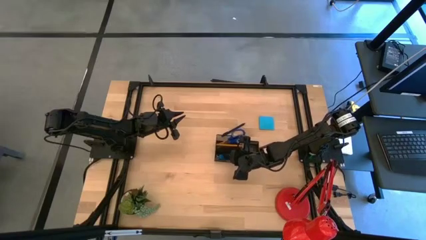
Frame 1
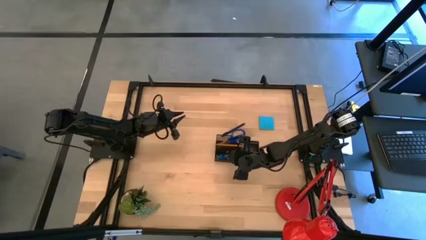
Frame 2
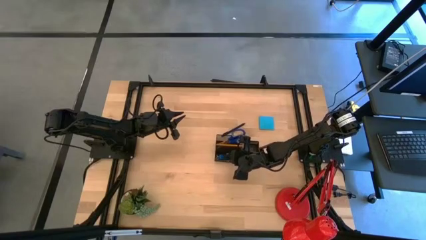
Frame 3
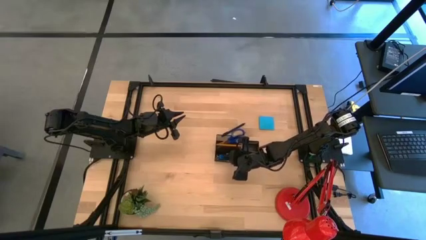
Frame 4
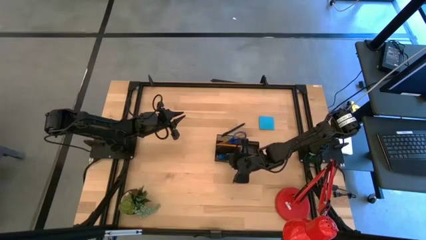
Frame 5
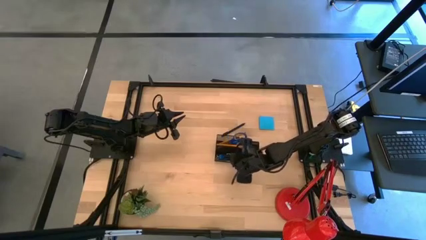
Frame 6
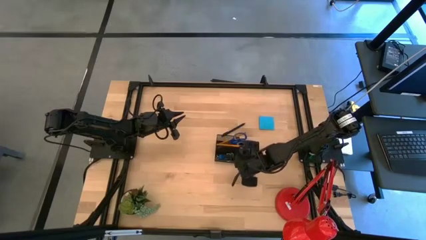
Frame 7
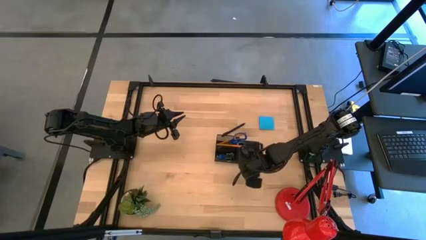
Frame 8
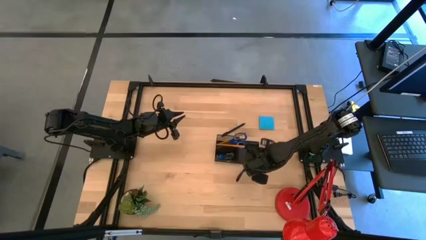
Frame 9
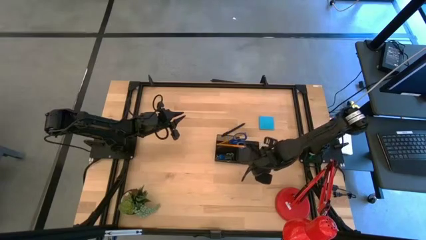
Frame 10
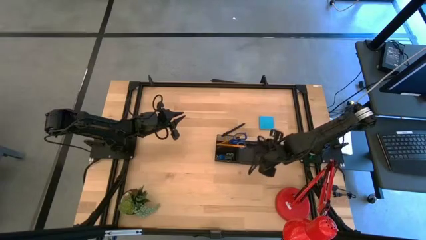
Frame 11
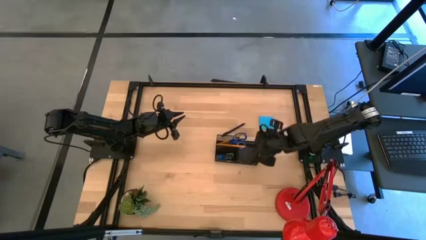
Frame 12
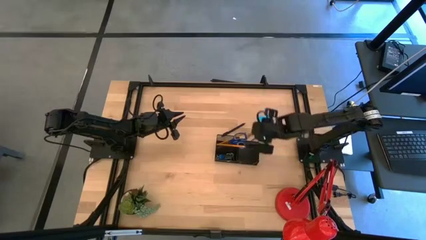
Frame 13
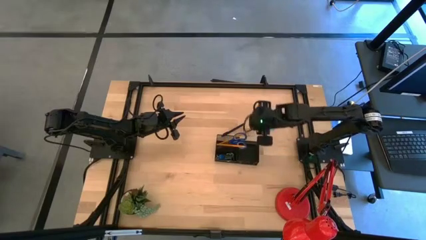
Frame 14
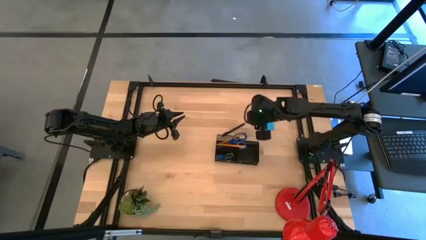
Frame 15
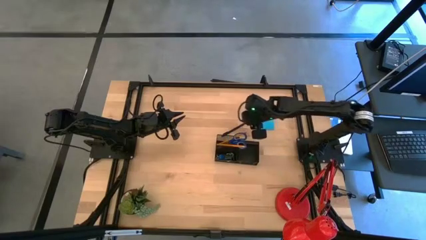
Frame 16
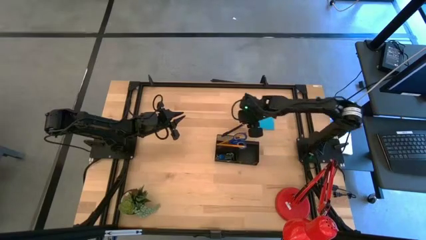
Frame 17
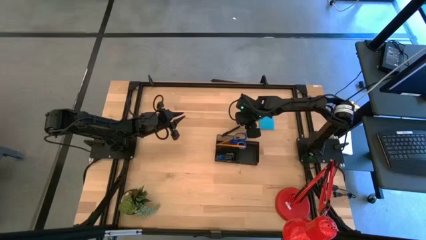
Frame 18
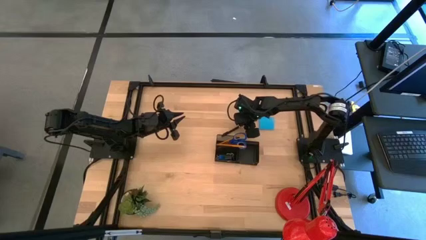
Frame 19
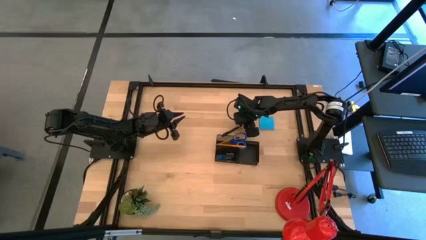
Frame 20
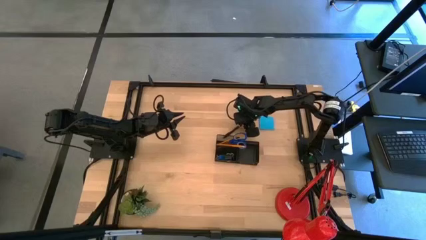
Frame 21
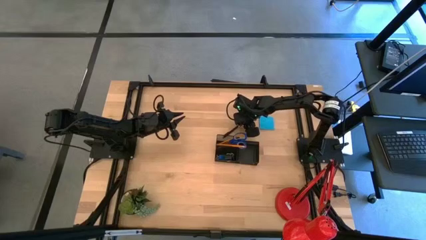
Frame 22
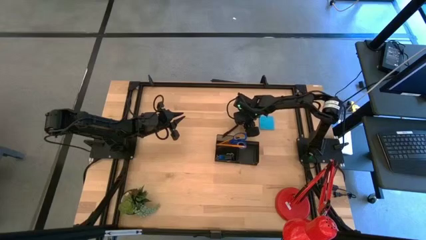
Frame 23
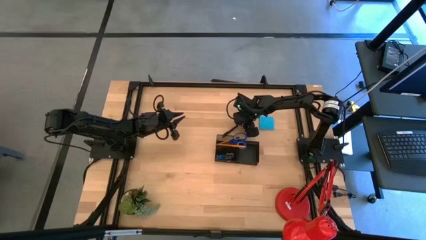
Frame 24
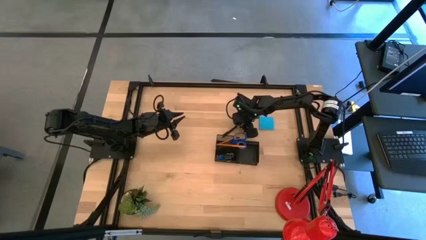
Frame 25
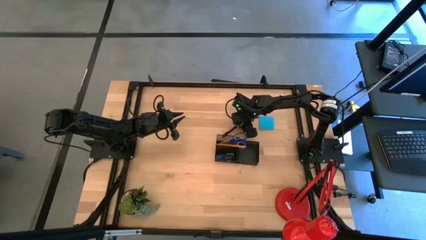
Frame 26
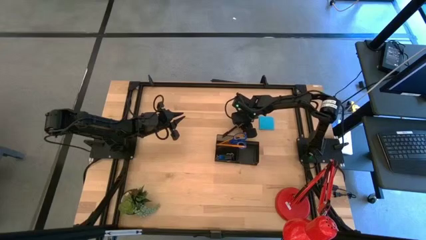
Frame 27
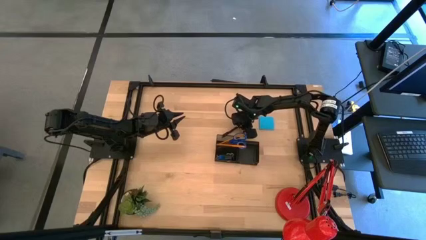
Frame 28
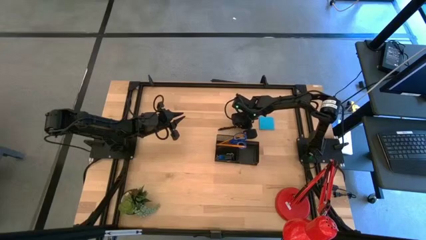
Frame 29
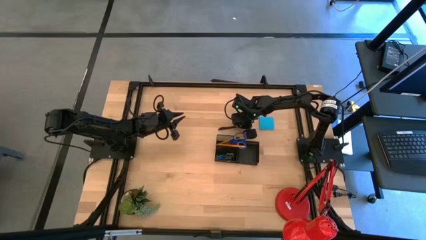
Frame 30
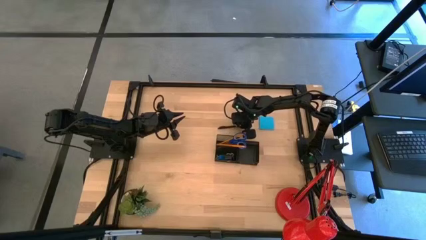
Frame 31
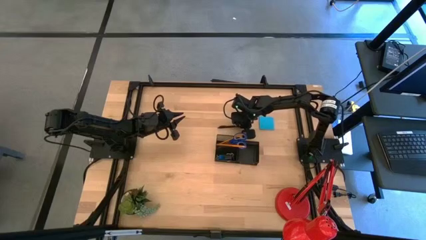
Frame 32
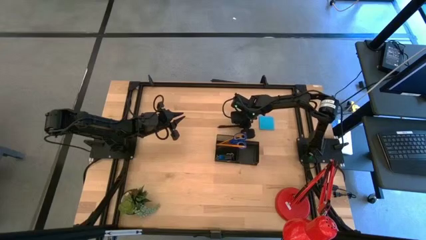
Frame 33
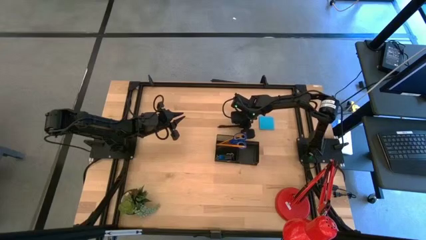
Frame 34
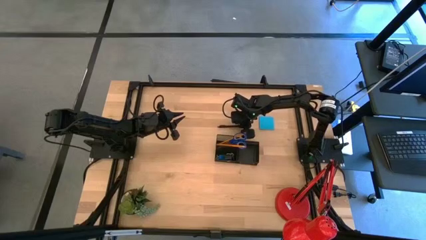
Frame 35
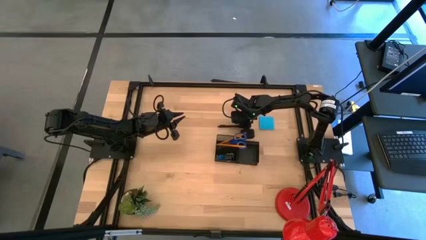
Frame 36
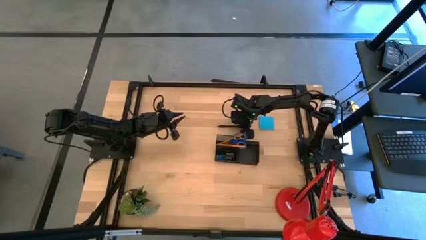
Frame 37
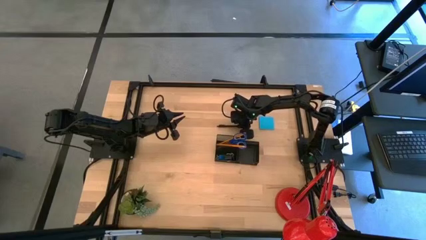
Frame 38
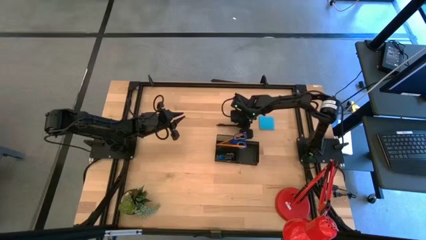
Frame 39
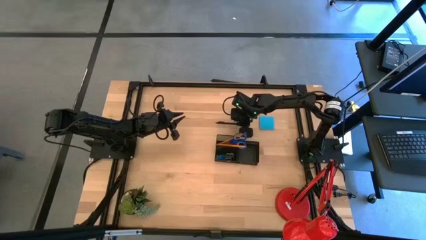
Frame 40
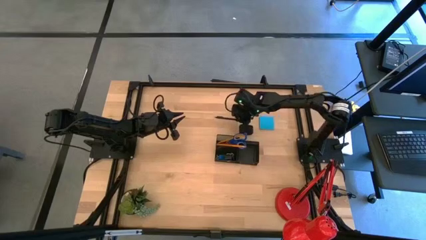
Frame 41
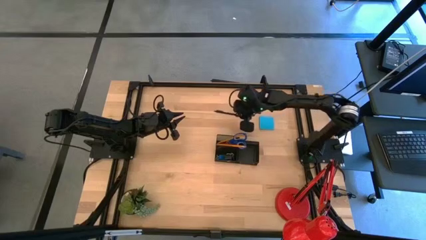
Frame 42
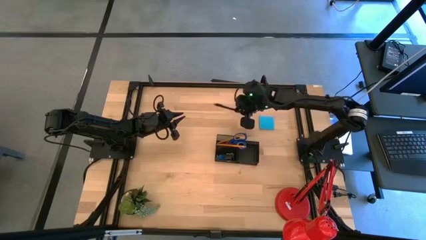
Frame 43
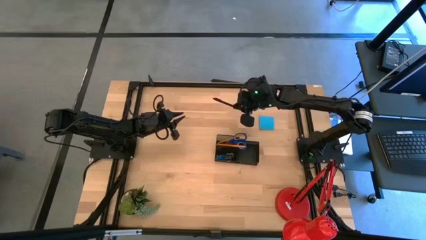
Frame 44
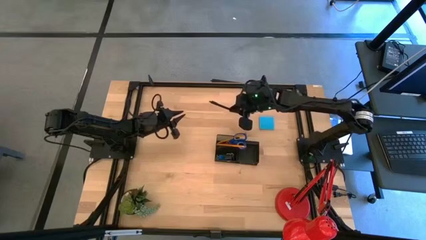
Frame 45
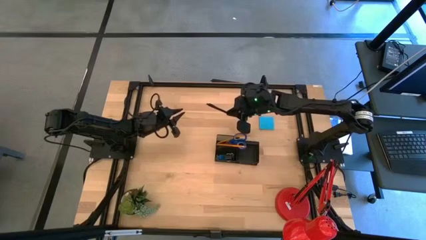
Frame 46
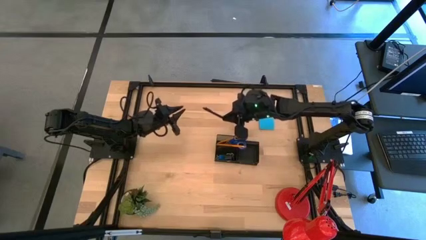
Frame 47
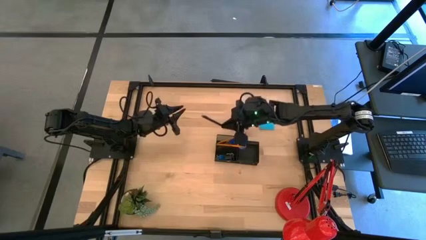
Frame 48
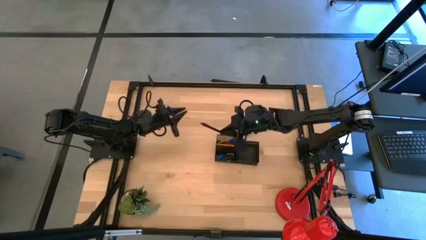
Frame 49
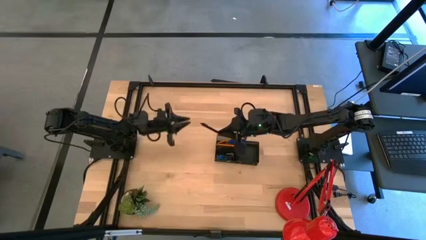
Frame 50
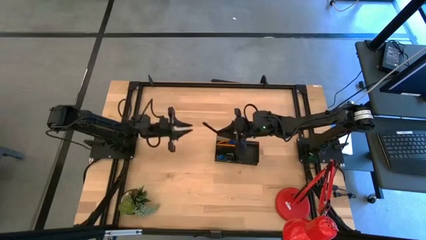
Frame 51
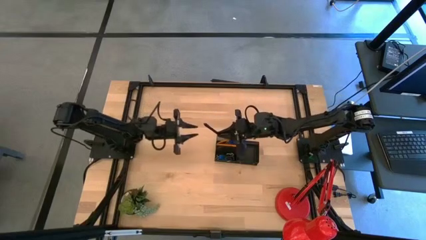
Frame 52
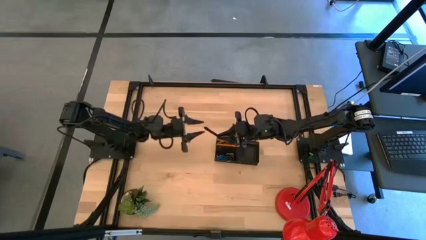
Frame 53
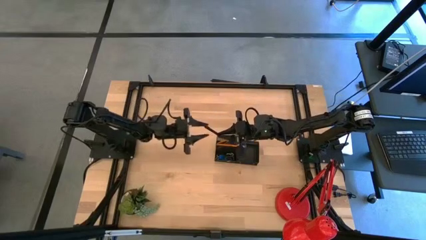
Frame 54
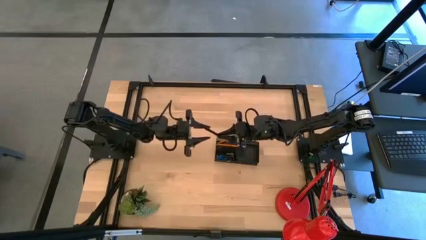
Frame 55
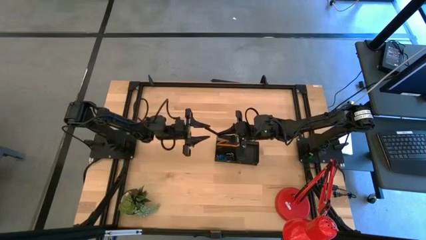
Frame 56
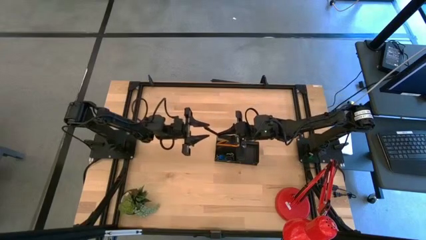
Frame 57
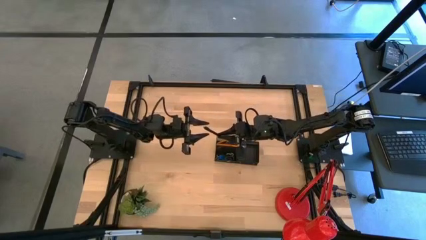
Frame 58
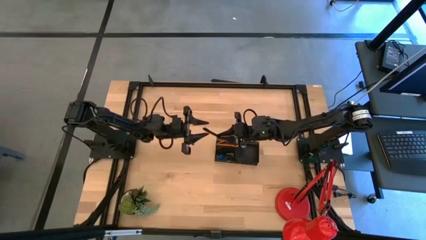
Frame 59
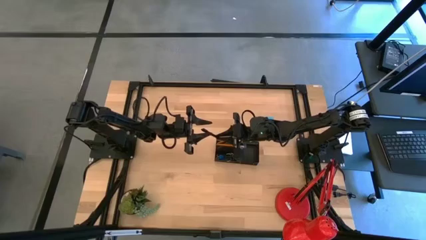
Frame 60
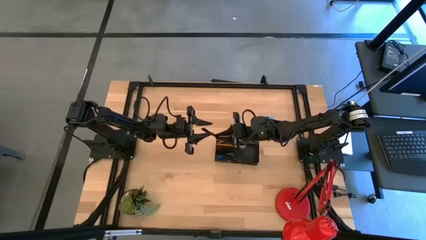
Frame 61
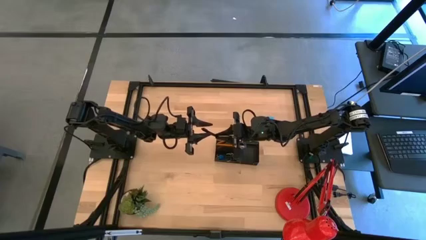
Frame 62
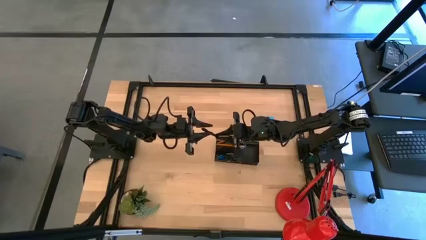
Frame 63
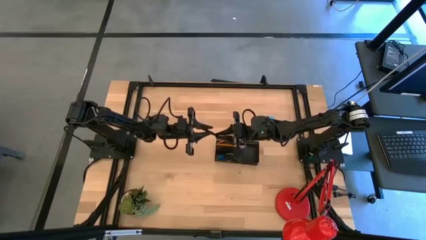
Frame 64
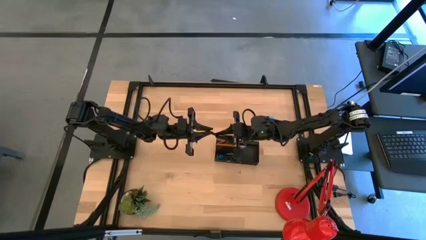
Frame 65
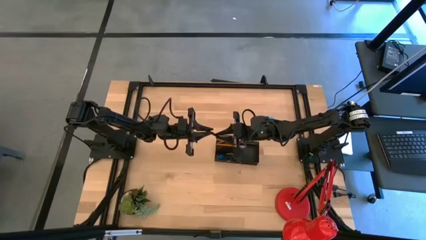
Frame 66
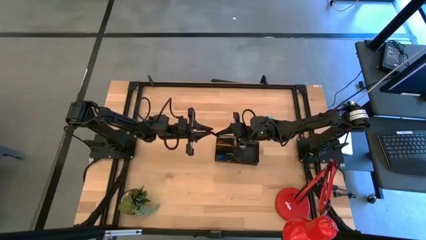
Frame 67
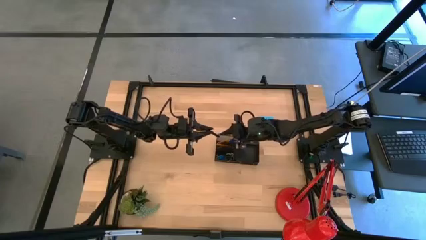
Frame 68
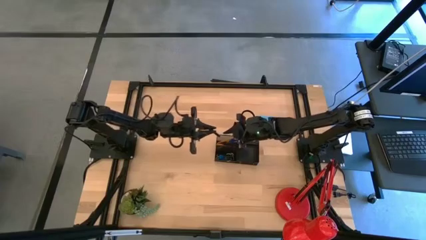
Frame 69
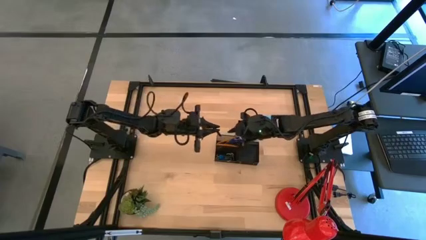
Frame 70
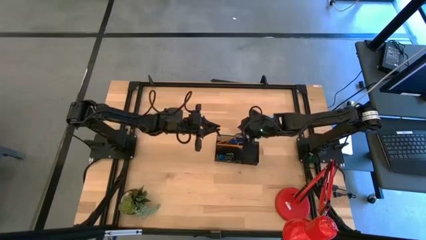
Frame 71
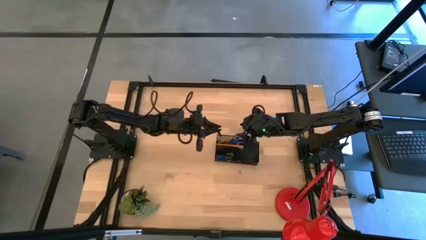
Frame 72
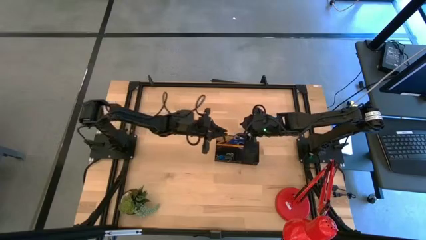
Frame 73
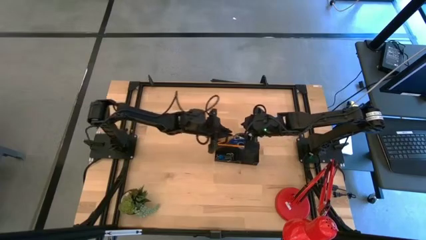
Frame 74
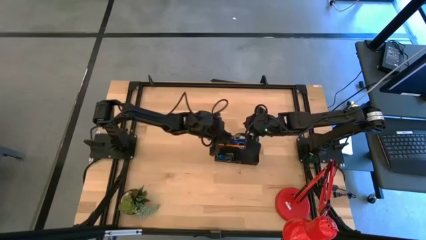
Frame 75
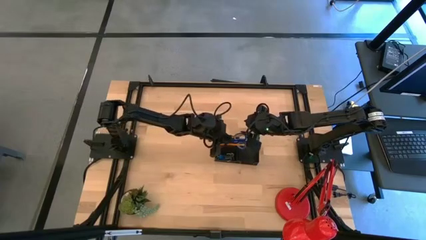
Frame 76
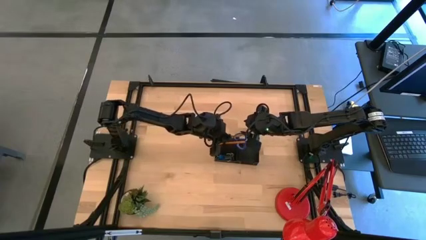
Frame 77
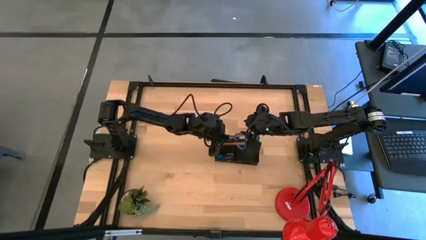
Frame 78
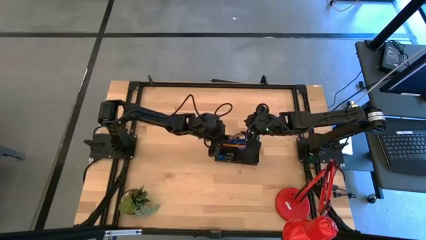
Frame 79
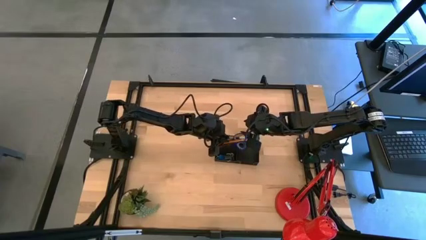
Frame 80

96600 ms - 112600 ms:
Task: Pick and place office supplies into organizer
Put the black pen into the black desk organizer

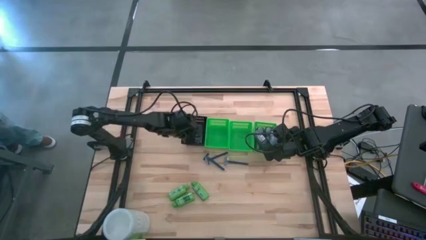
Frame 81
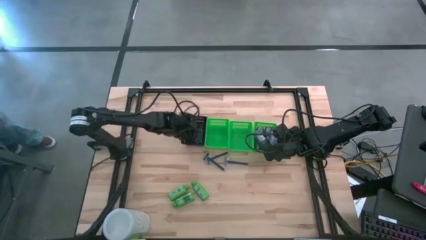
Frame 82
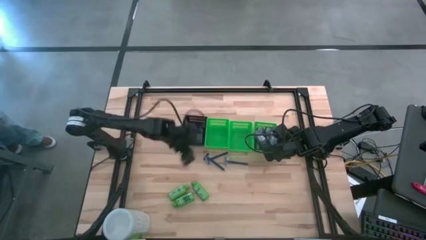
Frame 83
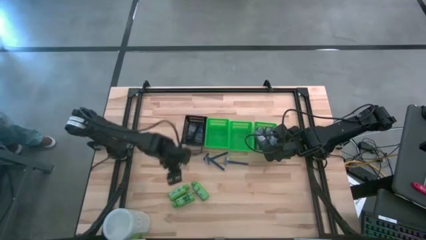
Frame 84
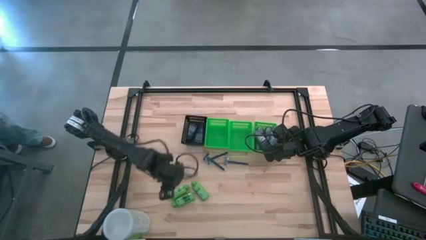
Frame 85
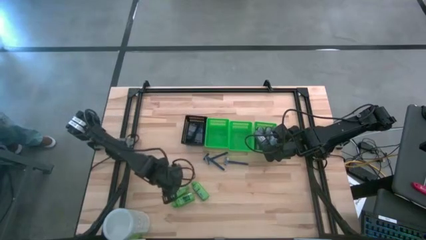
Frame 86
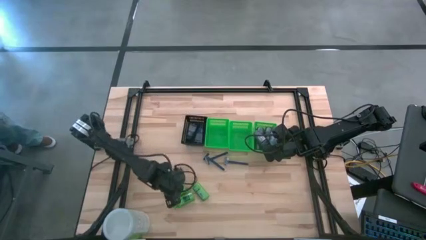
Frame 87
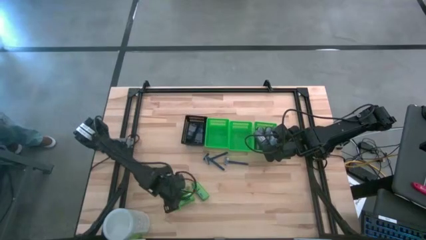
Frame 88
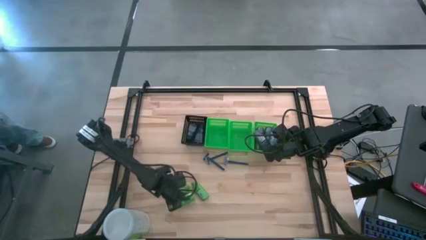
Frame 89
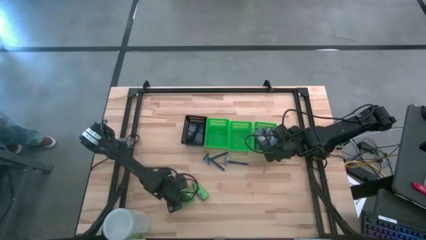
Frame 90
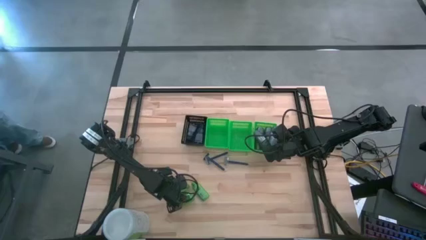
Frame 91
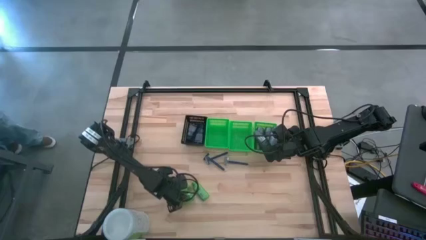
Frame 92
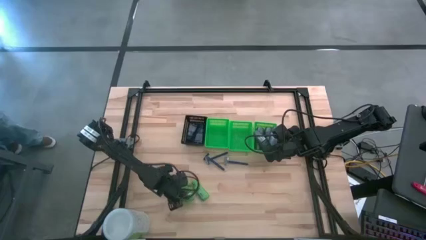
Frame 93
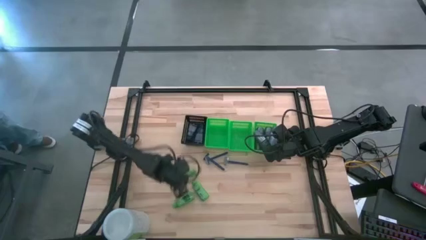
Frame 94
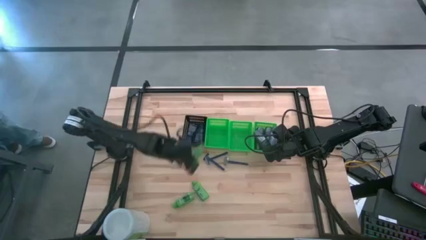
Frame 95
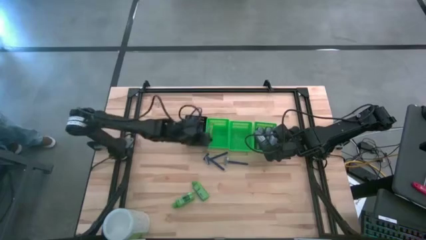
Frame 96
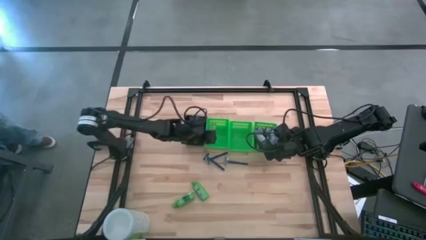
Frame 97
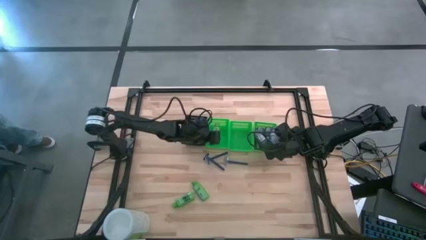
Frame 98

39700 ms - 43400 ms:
Task: Pick & Place Travel size toiletries
Put the green shampoo into the left green basket
